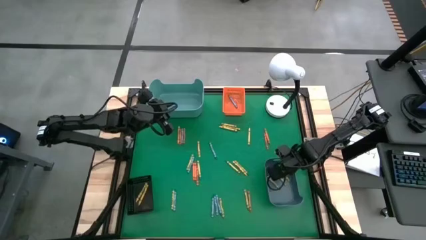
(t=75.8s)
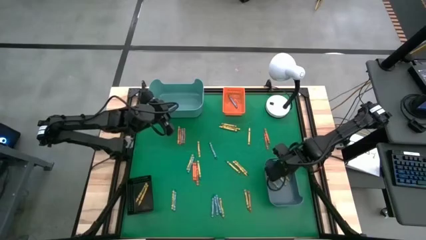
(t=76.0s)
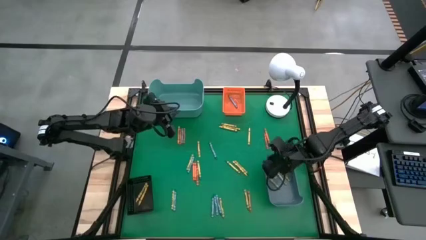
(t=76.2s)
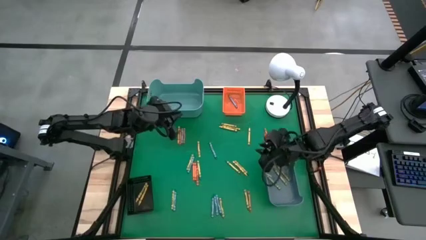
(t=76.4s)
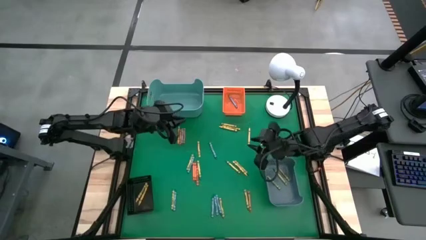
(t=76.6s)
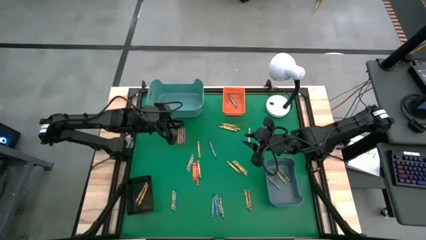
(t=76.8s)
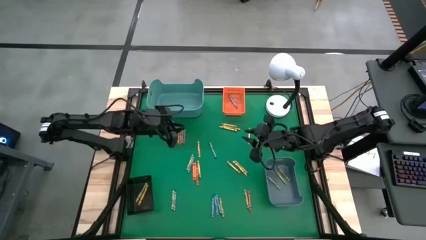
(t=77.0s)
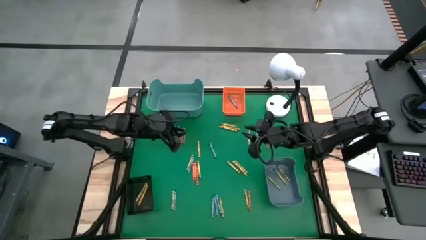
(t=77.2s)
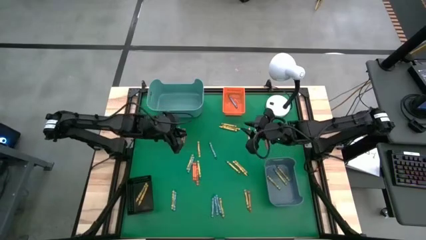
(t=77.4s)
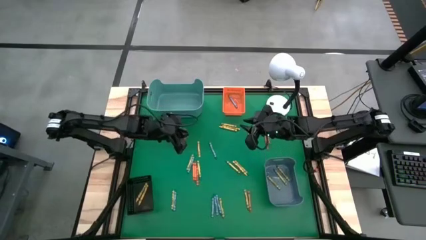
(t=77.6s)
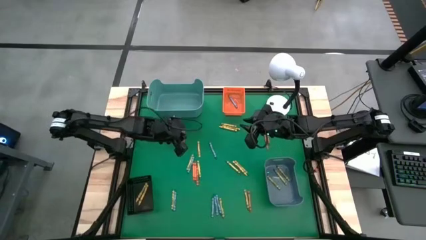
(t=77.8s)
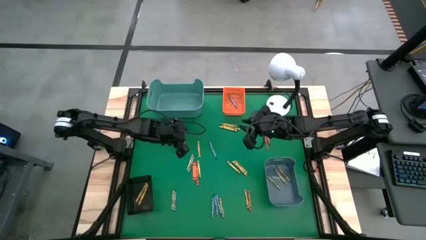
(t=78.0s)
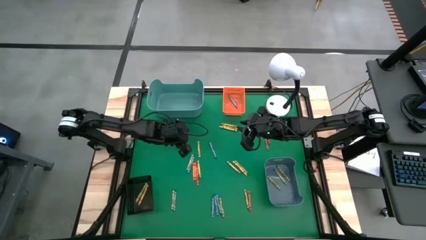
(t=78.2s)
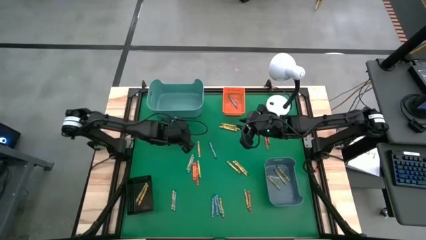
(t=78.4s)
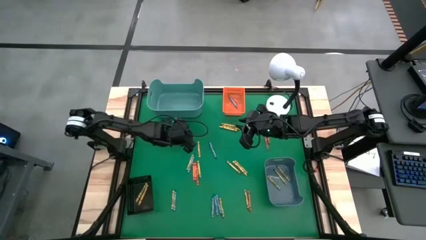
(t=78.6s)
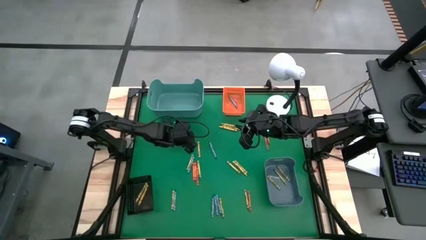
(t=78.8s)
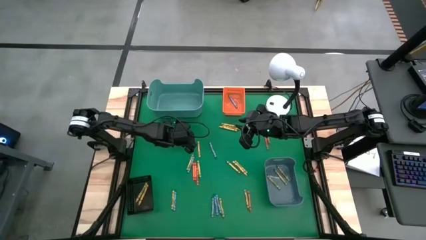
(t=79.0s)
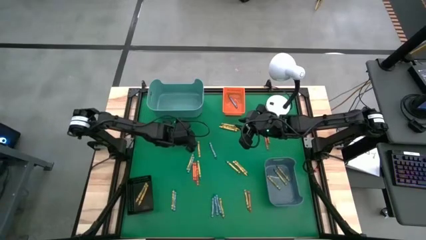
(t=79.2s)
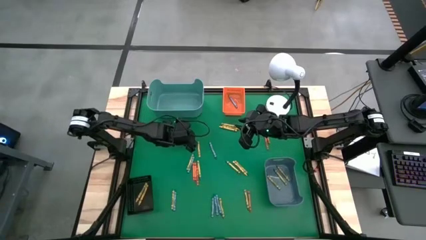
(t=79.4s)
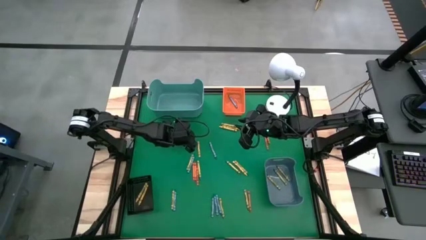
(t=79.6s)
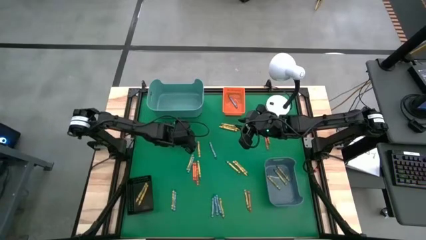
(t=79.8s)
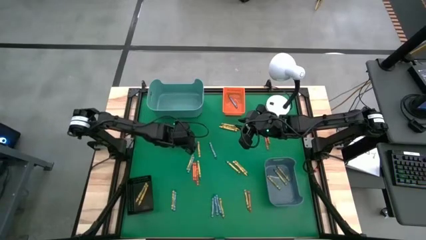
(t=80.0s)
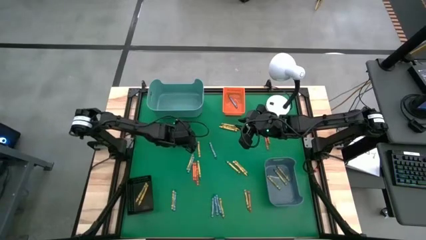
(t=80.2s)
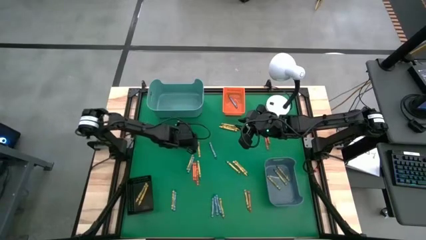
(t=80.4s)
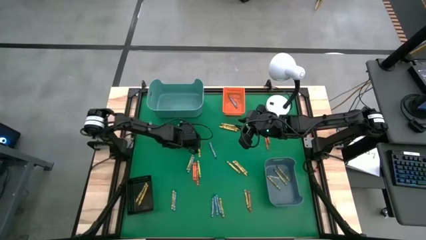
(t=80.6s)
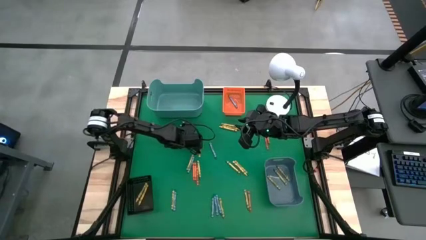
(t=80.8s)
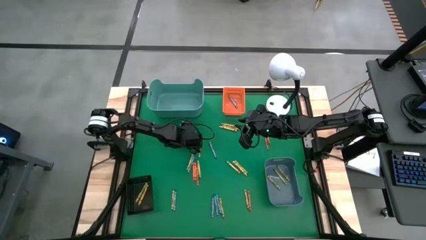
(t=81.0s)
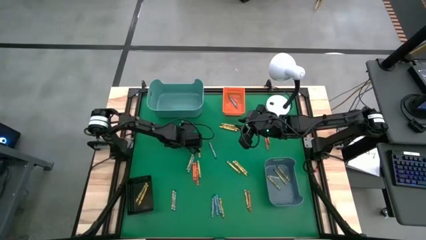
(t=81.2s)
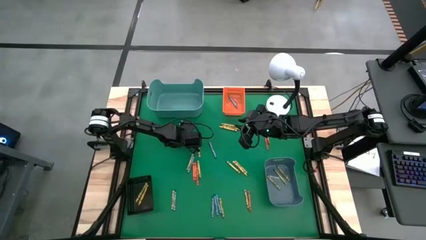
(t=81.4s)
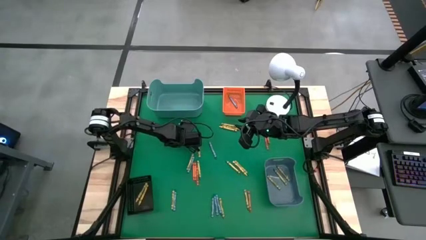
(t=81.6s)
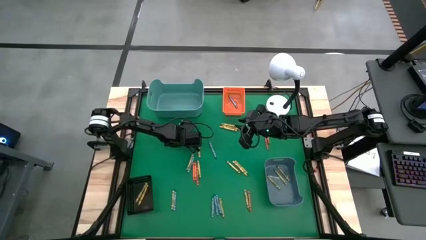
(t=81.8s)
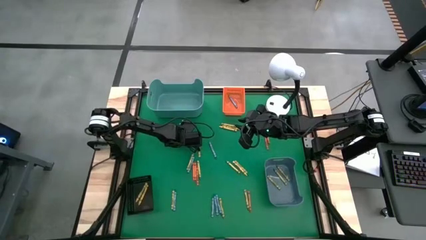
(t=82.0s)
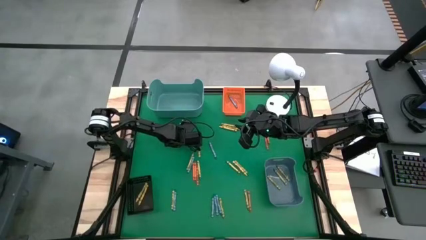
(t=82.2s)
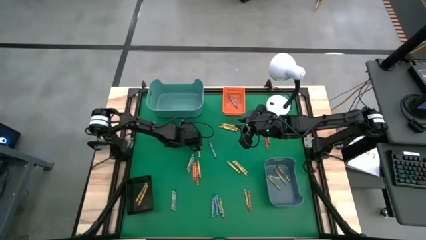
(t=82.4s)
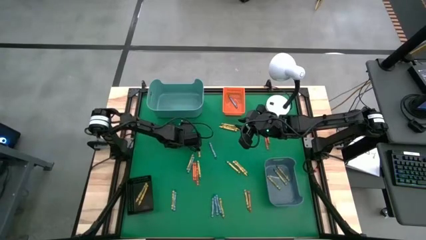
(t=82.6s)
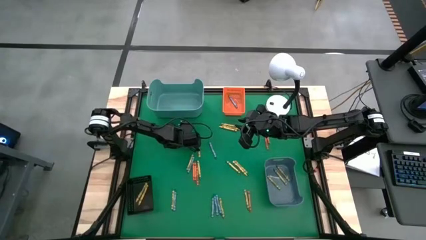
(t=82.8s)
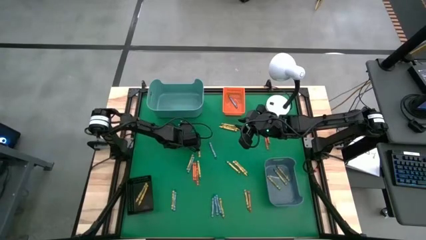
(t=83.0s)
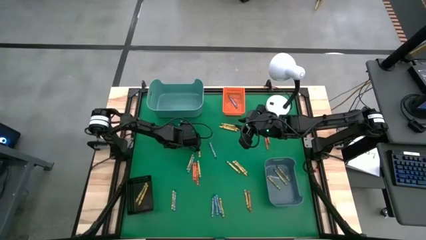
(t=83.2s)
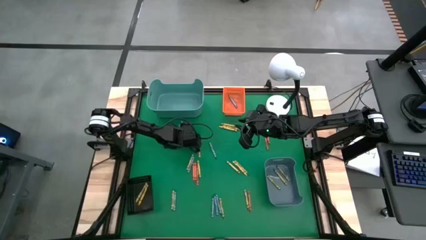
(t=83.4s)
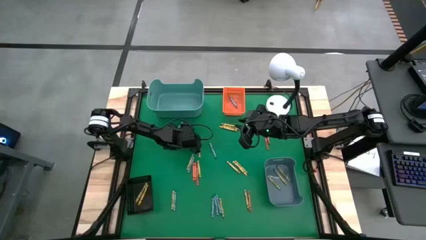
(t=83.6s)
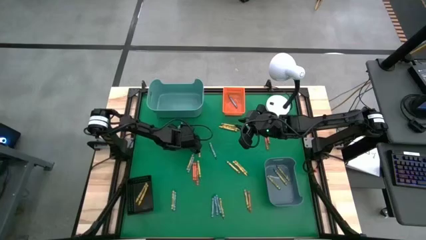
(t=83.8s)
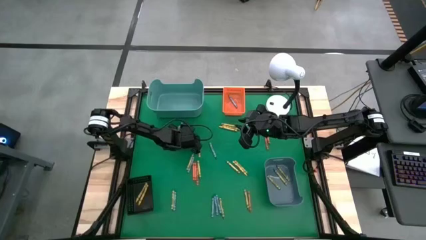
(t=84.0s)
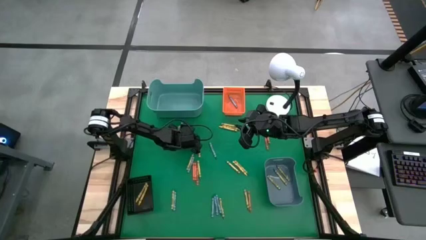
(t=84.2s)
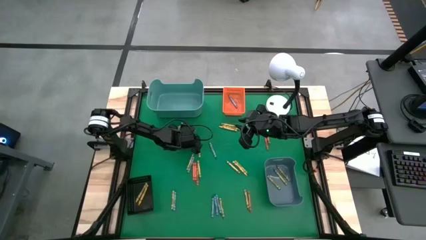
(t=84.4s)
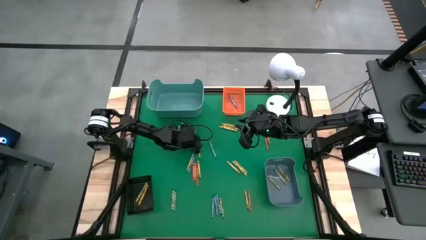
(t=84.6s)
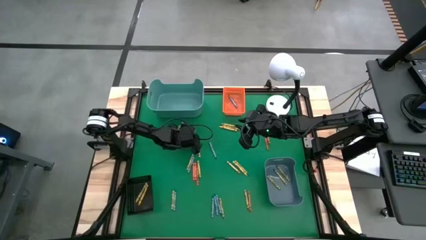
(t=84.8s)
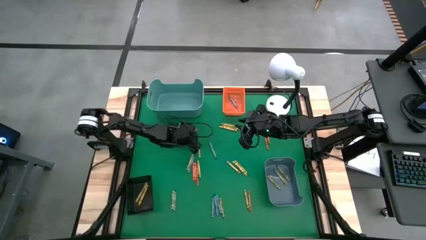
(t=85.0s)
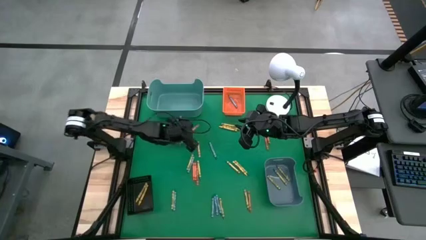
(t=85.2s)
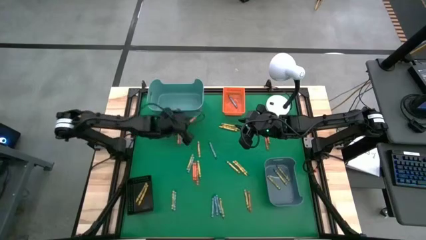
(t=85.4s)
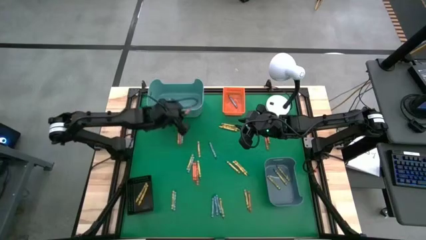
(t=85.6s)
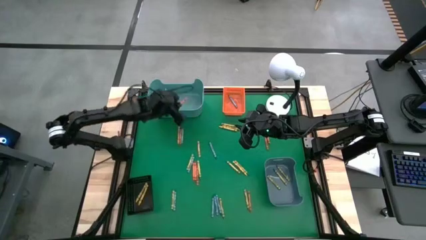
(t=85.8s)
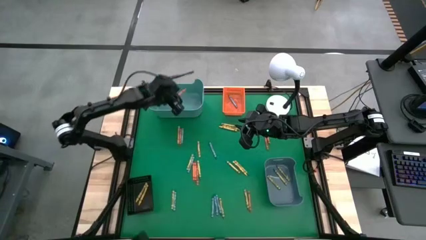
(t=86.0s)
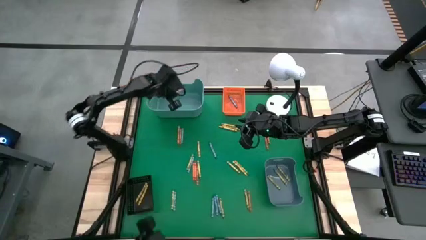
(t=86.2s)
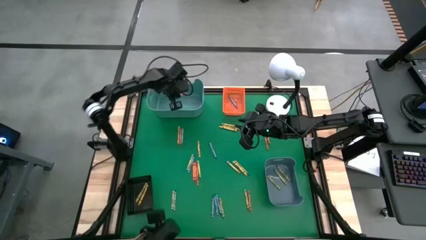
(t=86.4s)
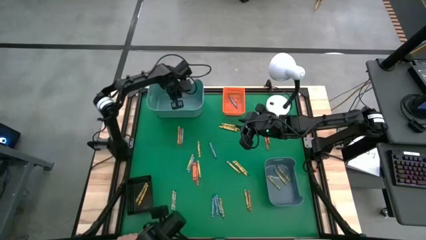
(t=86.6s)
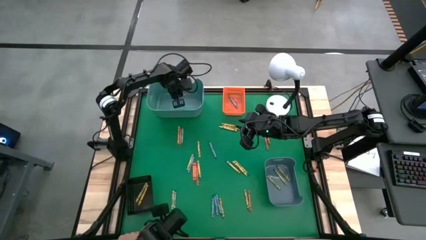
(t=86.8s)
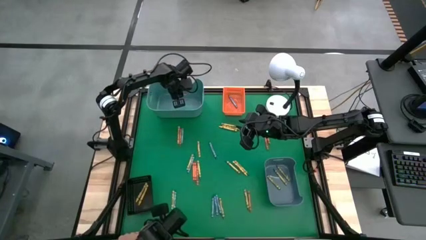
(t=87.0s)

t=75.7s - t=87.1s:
Task: Sort crayons
Put the orange crayon into the green bin

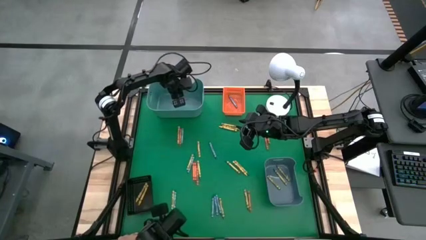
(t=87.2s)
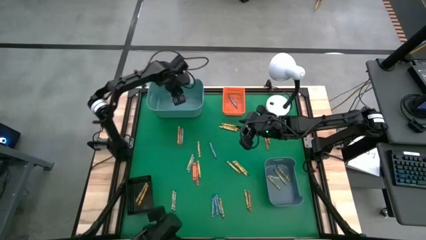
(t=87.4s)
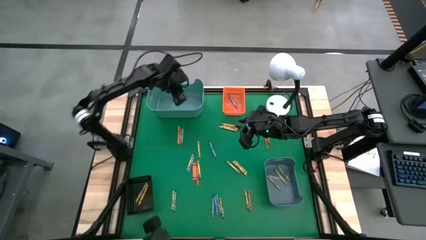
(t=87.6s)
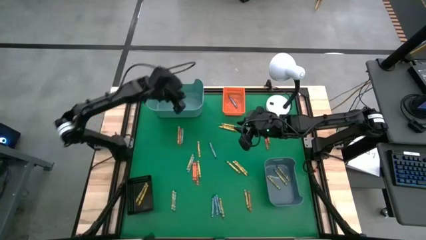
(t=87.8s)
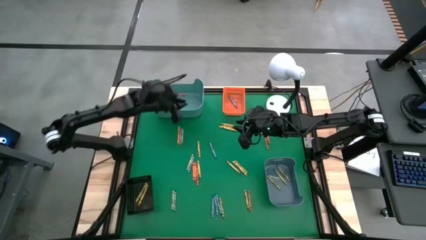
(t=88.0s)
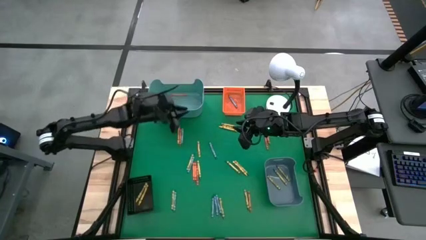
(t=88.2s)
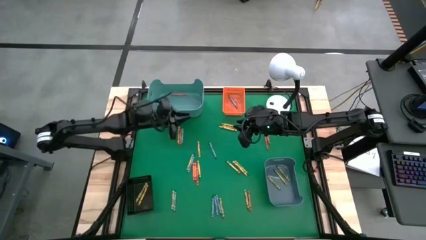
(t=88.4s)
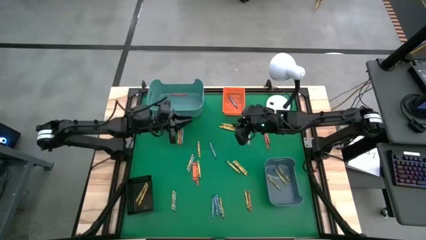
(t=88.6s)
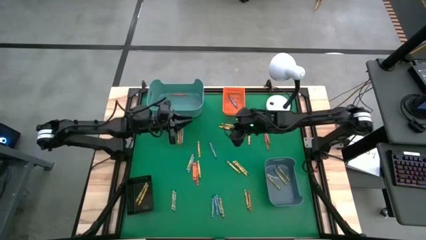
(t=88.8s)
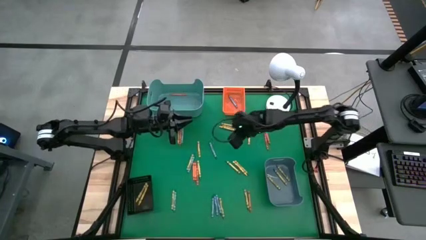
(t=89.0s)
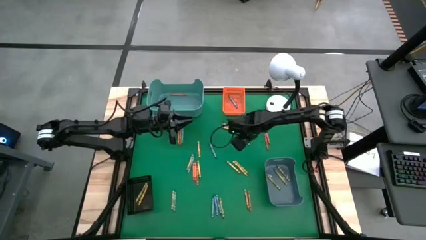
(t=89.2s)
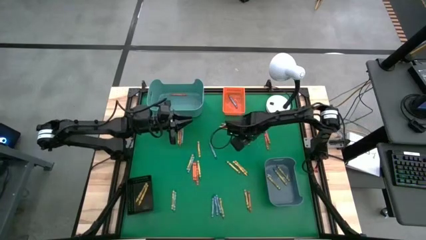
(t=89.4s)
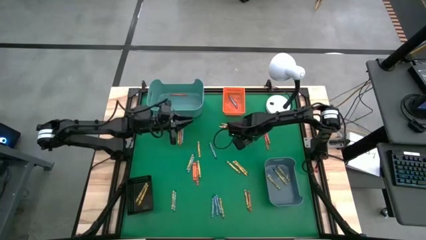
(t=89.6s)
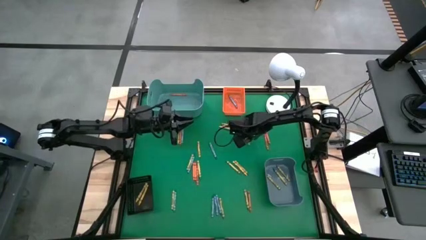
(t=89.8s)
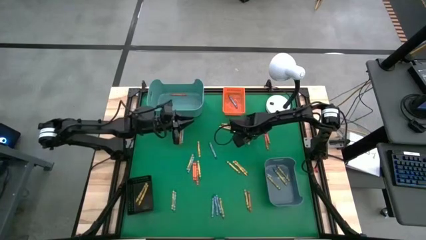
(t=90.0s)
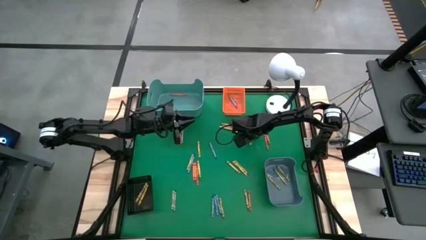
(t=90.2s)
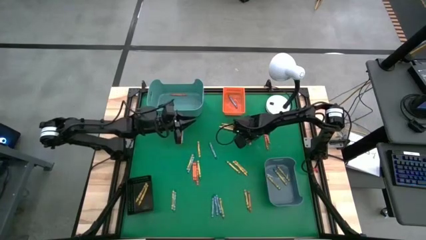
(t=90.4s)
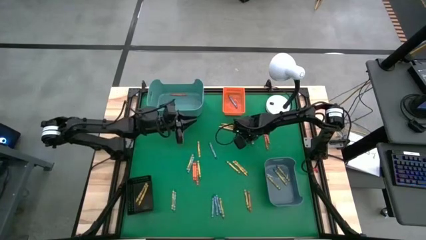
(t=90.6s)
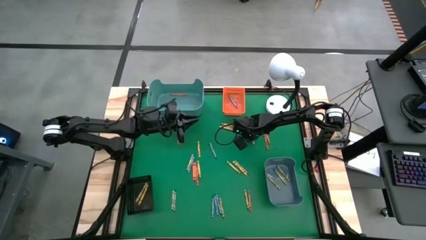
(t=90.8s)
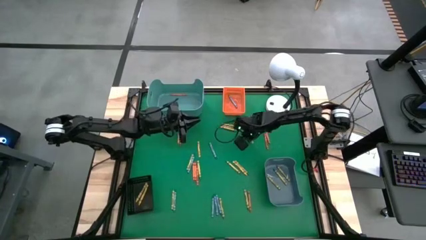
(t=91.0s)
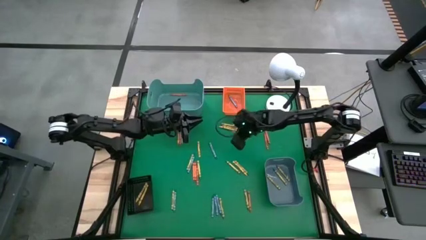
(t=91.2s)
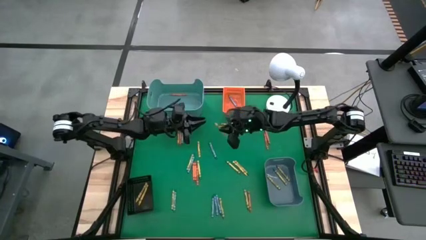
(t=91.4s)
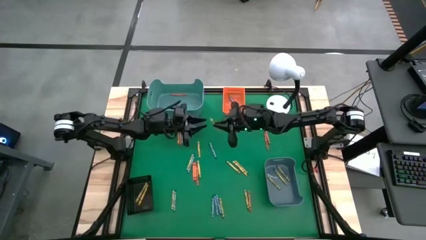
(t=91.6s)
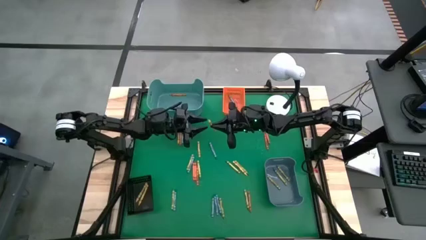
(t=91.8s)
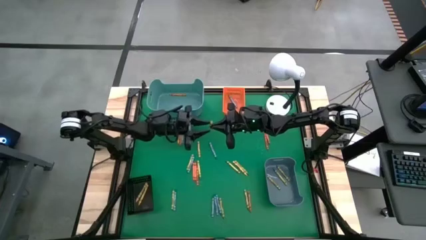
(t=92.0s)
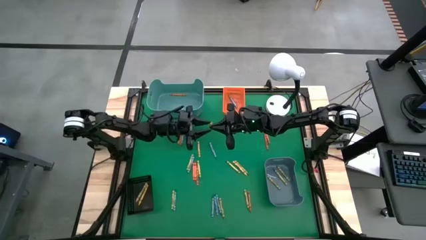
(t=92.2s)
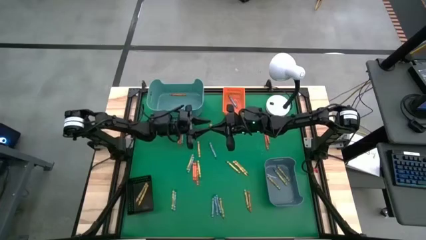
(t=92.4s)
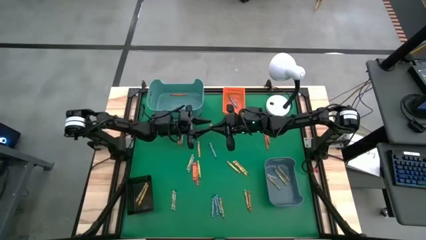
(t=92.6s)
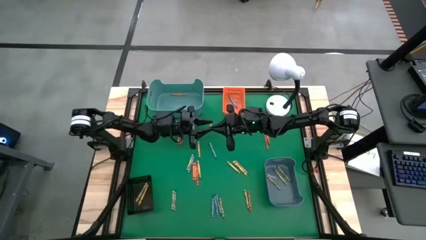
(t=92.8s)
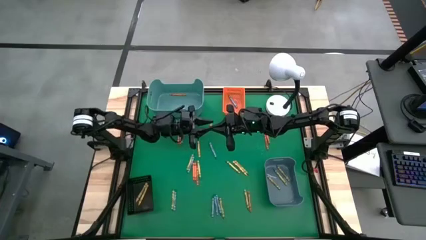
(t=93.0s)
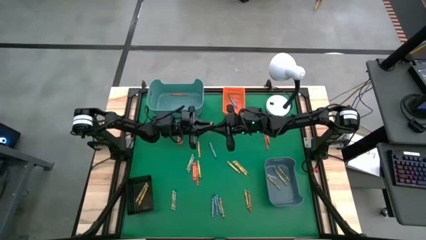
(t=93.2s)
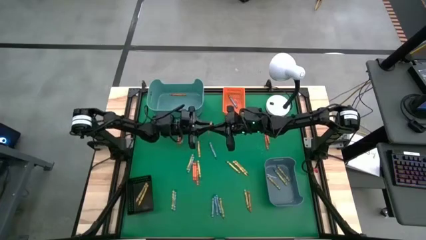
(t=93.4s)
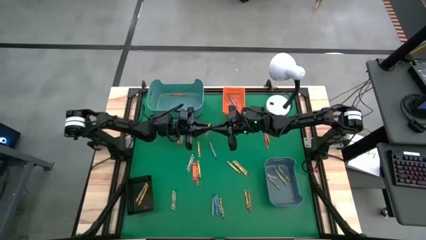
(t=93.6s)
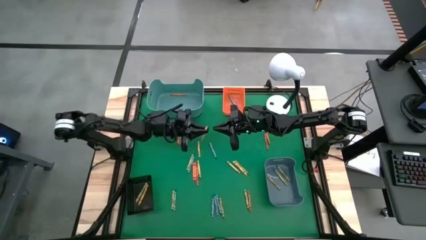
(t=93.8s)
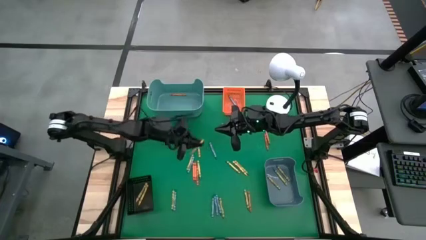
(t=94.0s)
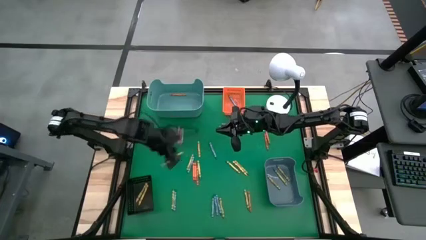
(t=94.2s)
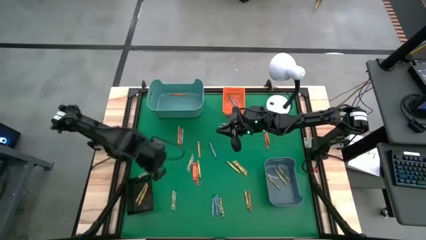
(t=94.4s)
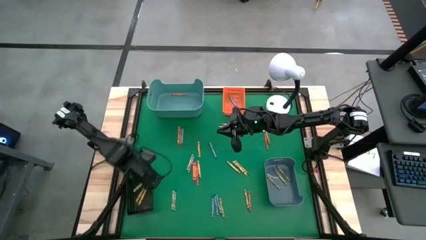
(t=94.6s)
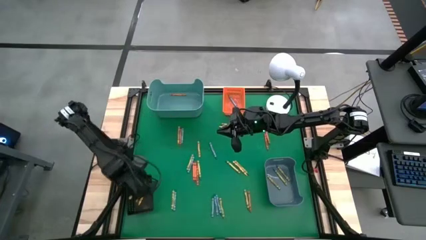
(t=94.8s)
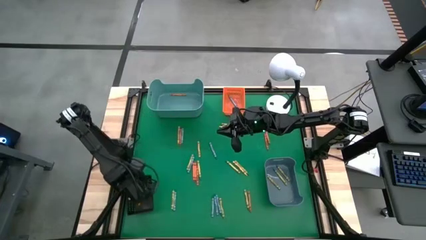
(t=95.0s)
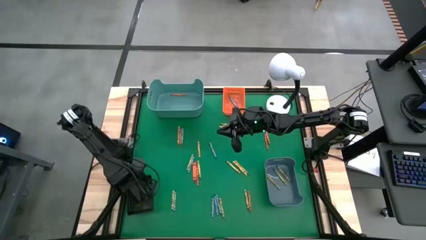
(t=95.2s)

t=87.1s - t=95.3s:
Put the yellow crayon into the black bin
